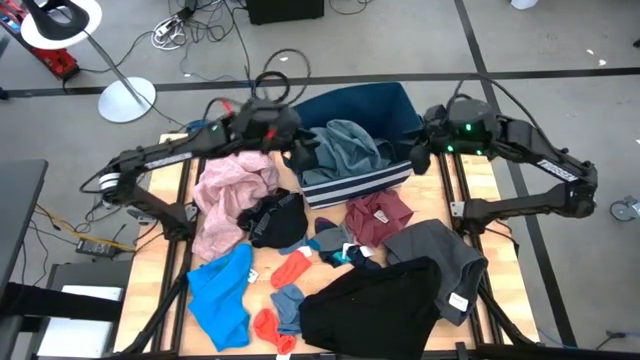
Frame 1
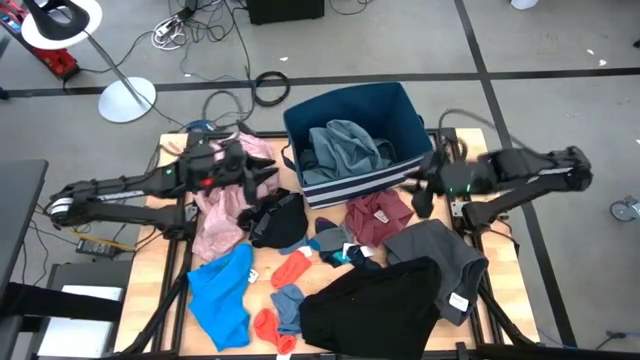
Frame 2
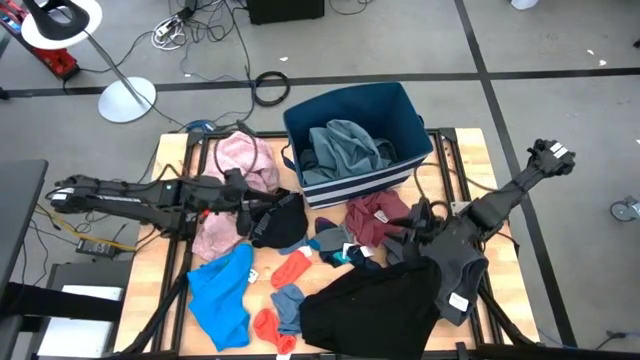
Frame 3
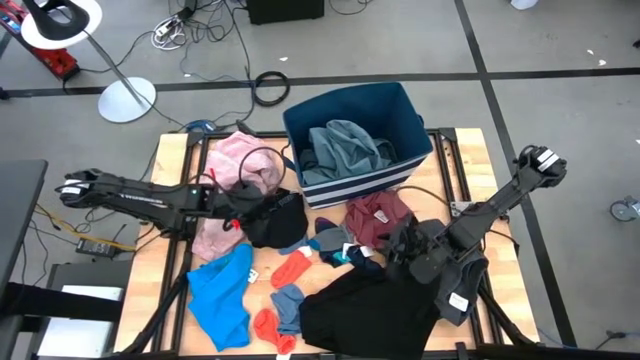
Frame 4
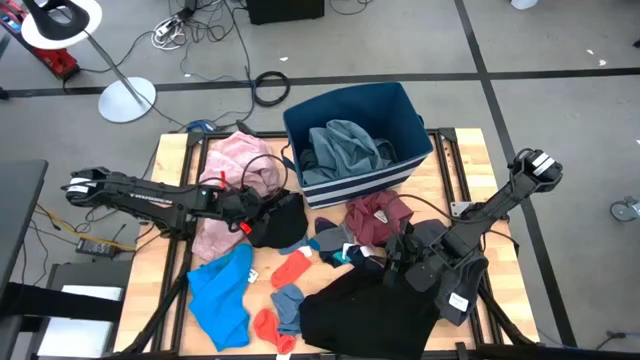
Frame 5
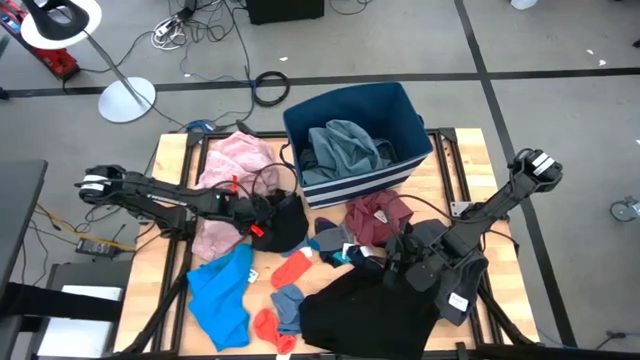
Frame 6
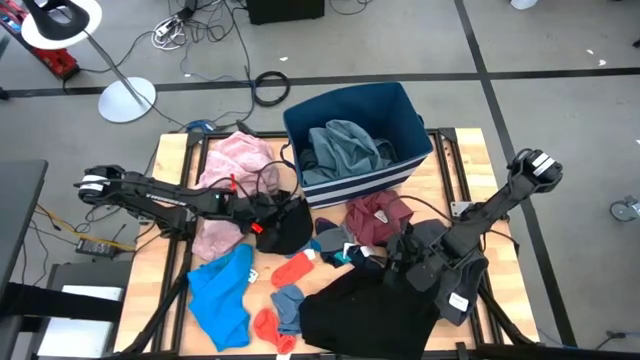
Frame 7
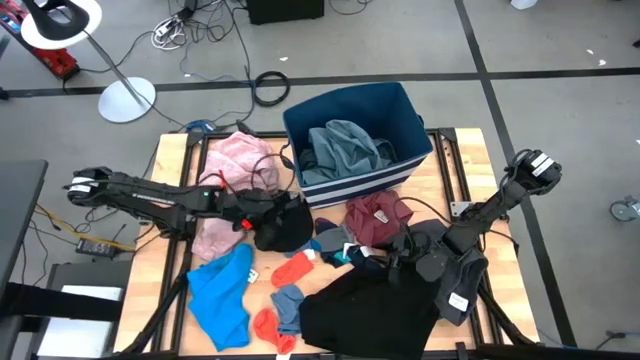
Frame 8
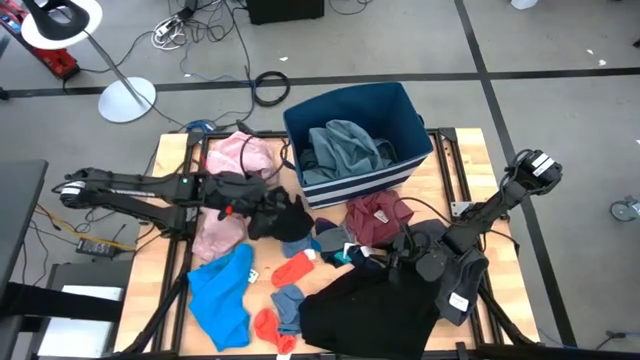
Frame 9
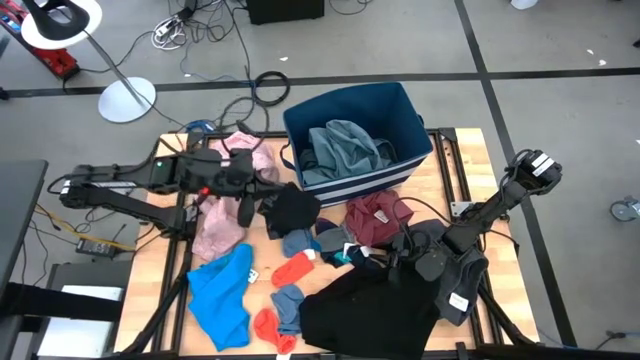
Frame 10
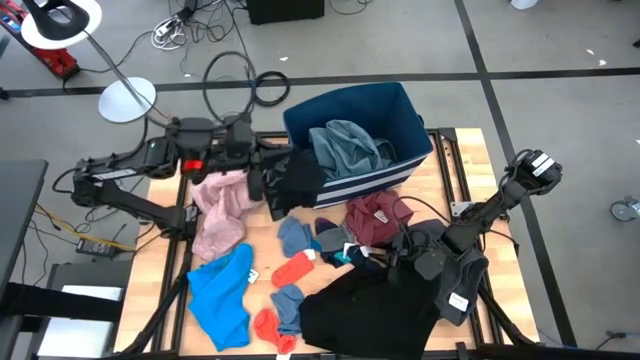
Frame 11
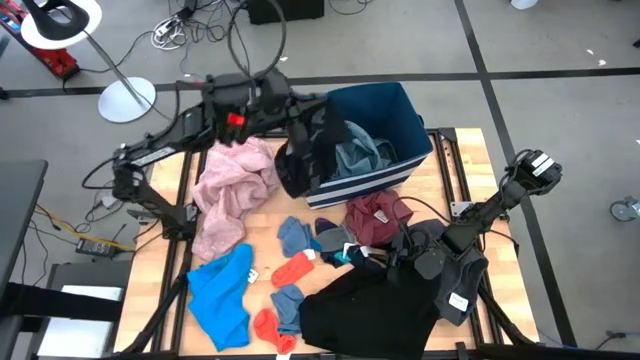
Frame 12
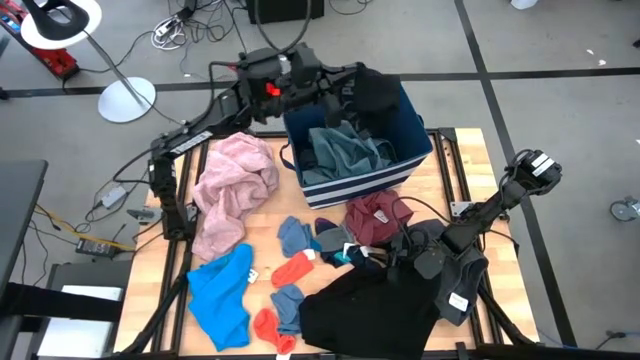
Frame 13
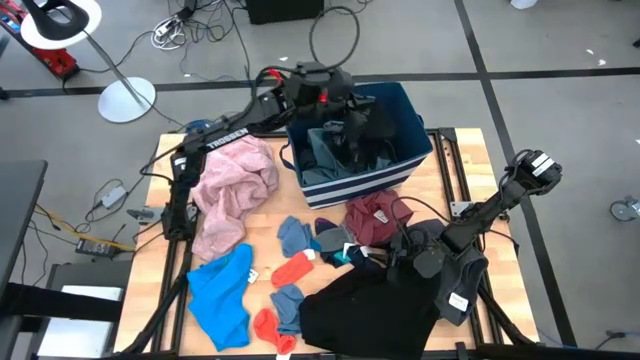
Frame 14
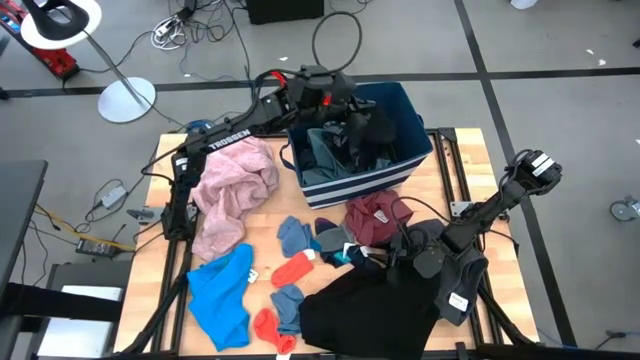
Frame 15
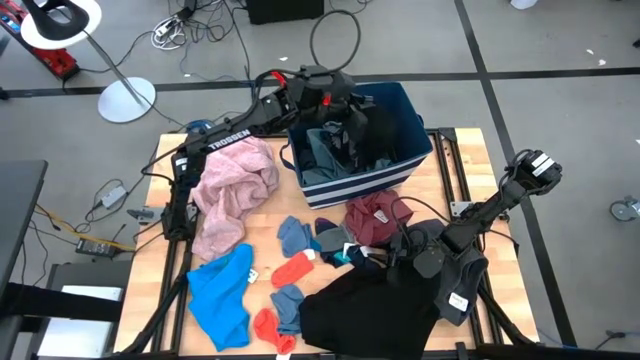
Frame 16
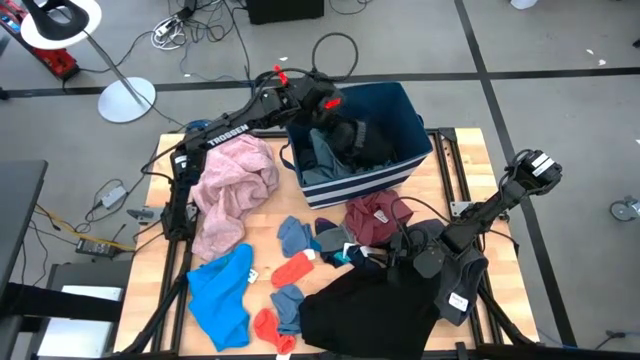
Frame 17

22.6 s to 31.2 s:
Task: Sort clothes
Put the black underwear in the blue laundry bin organizer

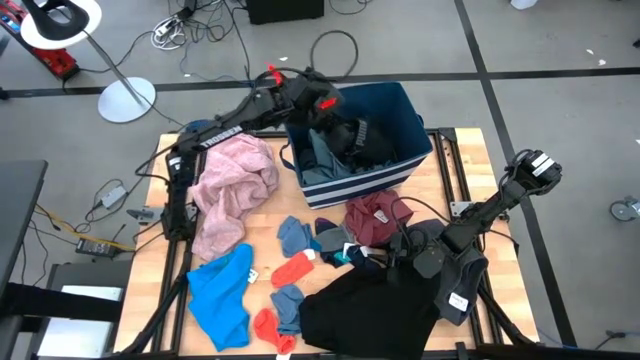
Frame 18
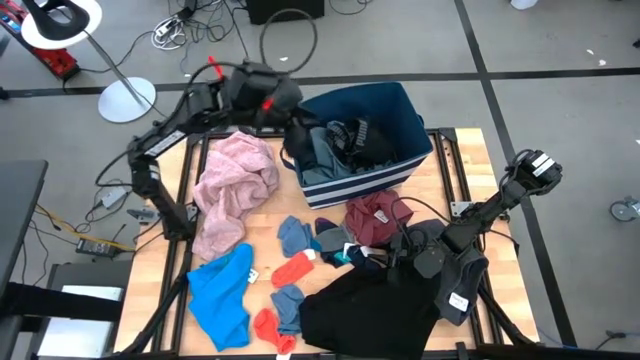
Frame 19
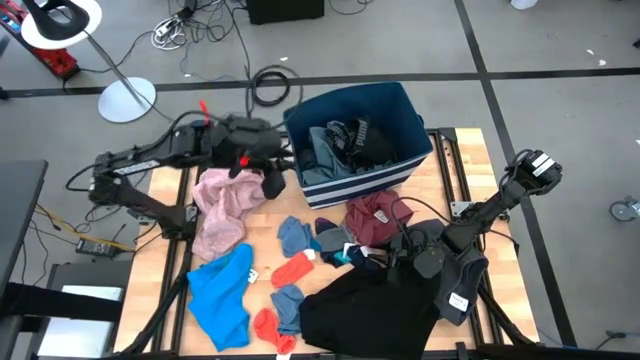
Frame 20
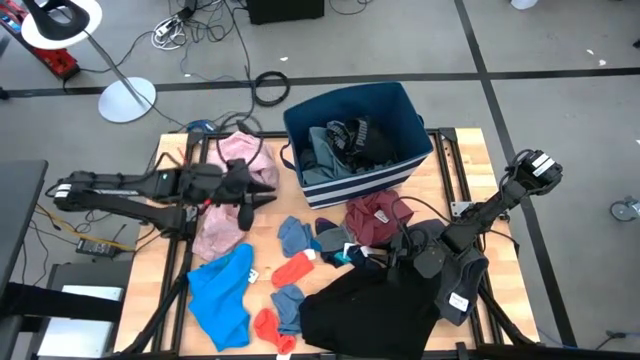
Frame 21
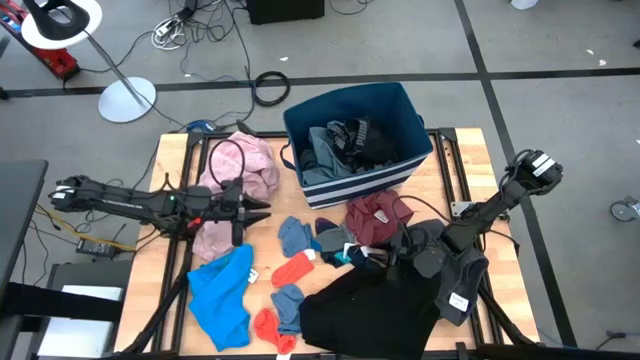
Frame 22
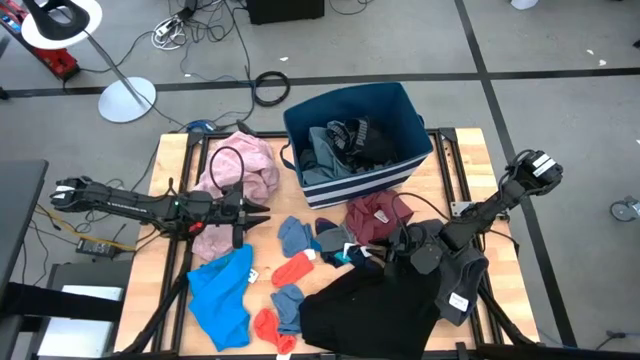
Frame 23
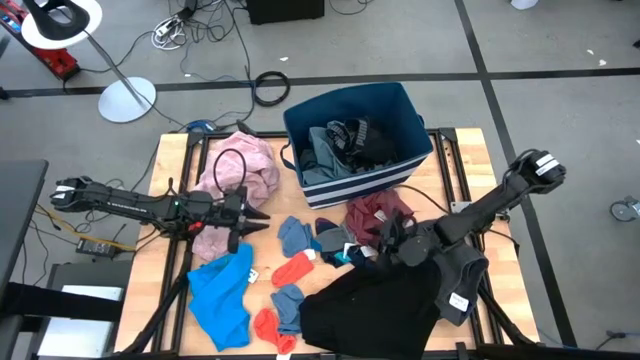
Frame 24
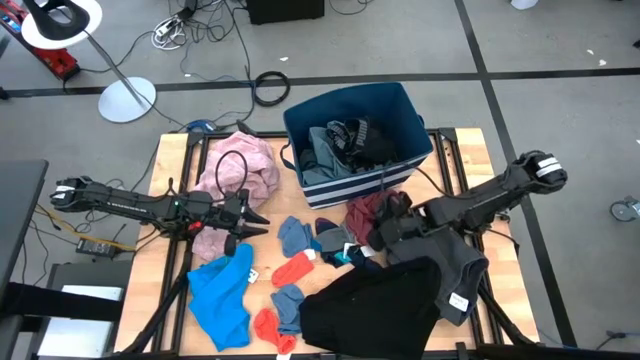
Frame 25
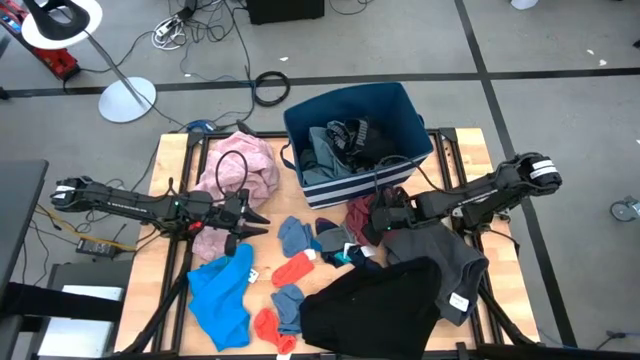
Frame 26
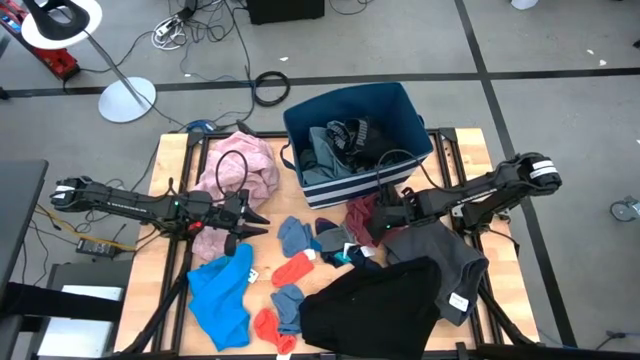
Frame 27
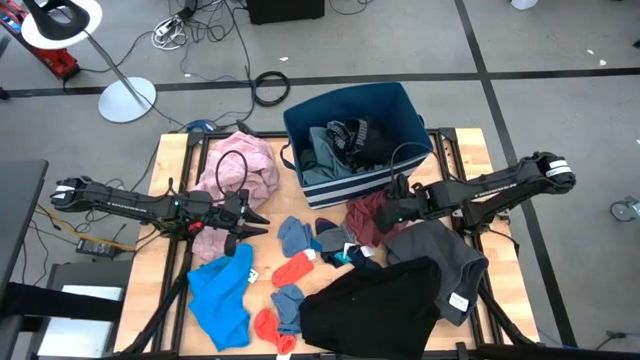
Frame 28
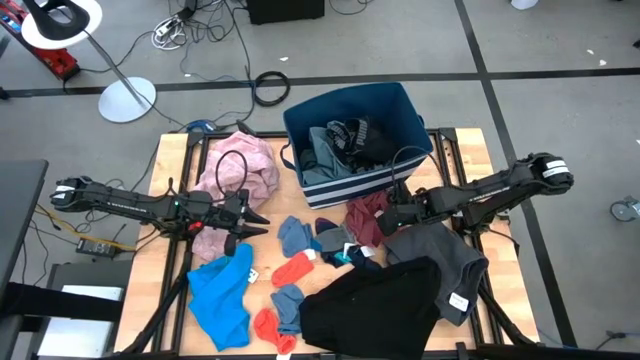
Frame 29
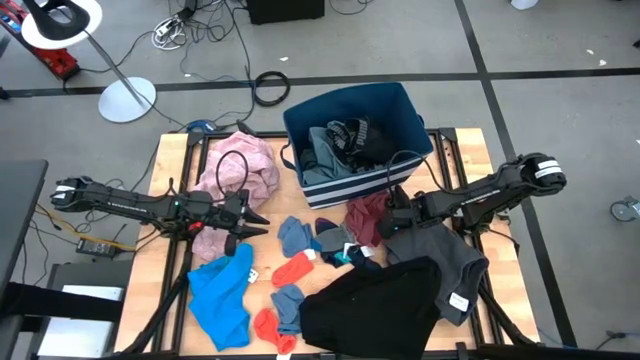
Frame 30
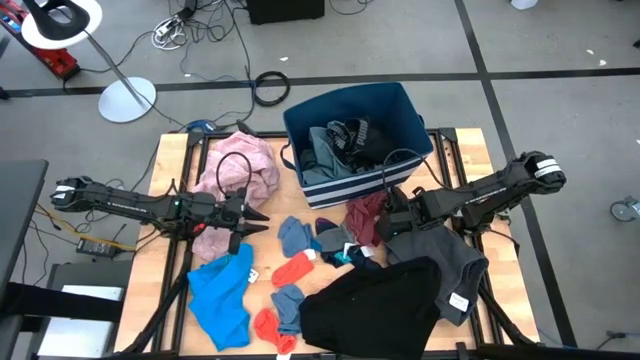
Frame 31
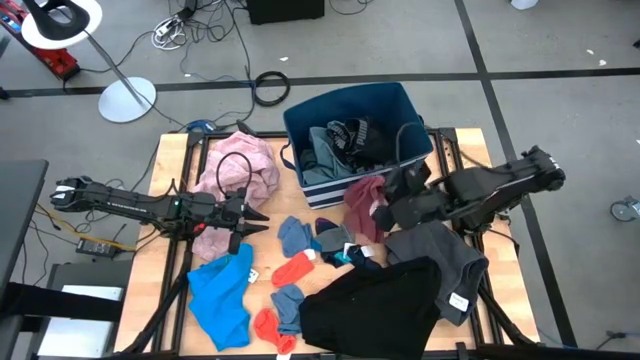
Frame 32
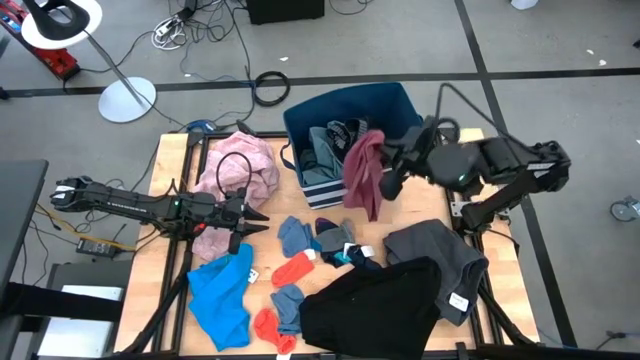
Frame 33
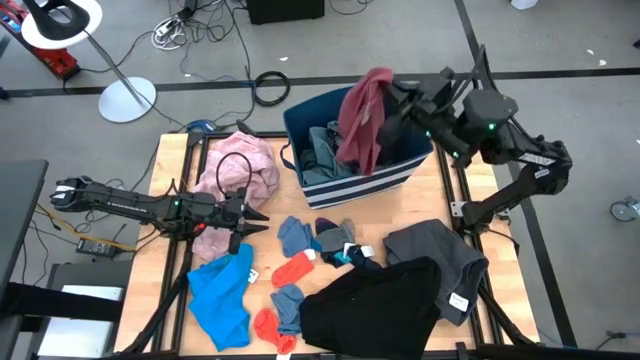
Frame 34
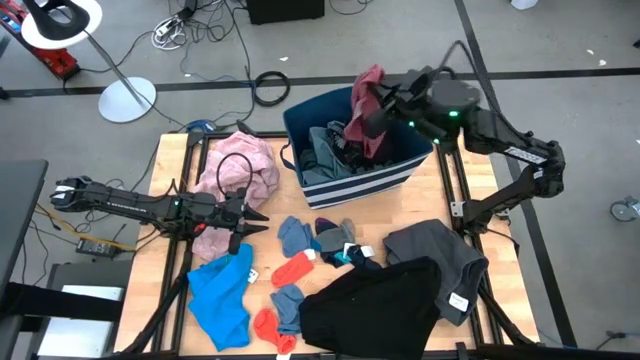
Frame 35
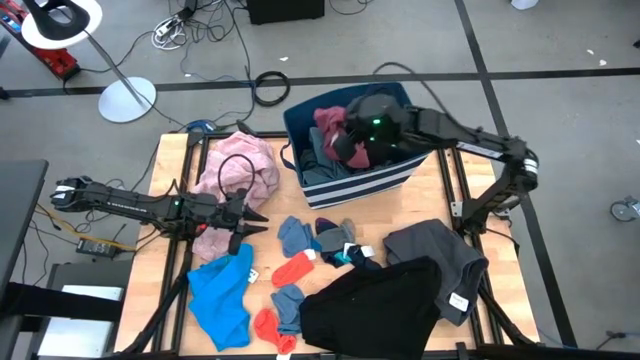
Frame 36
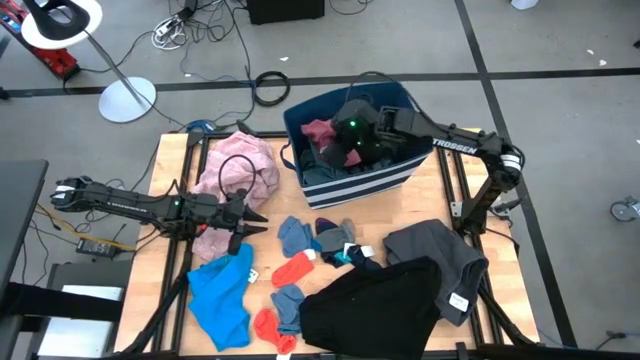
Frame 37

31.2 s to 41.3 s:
Put the maroon underwear in the blue laundry bin organizer

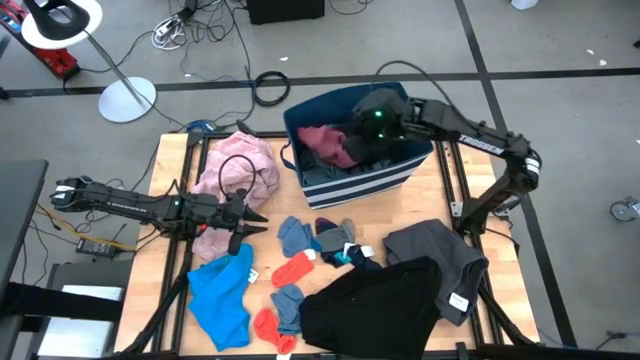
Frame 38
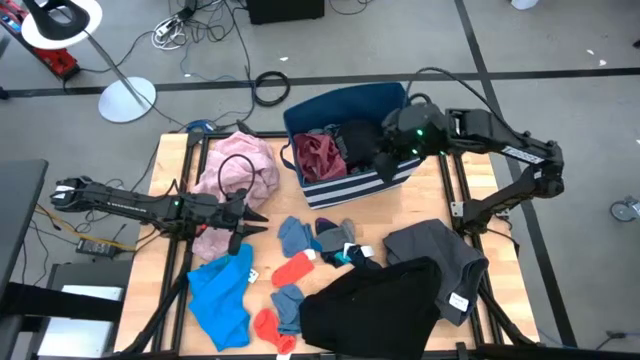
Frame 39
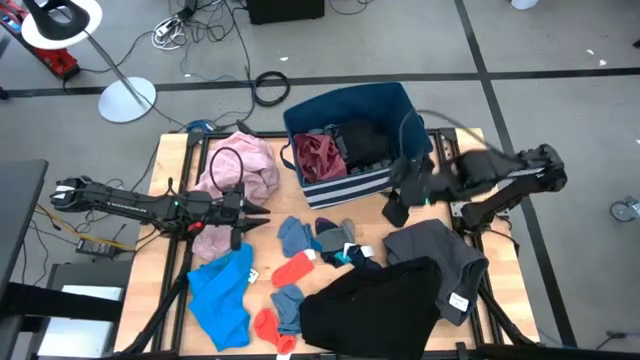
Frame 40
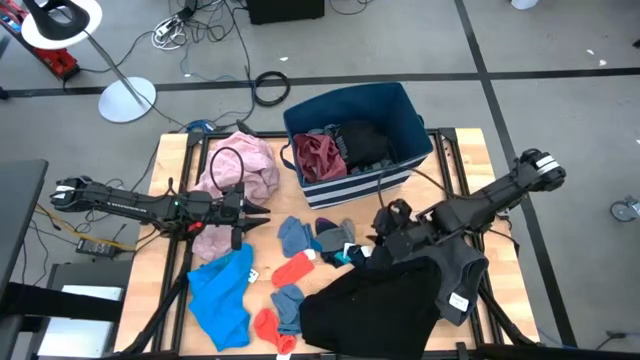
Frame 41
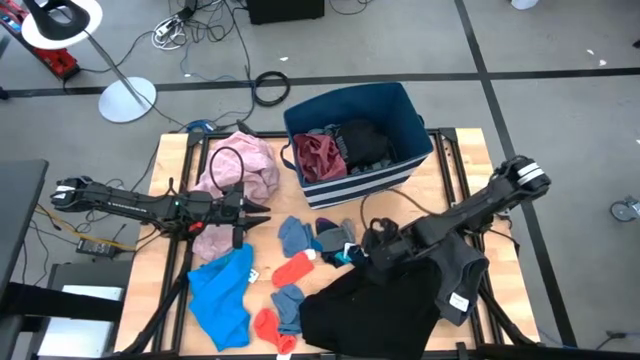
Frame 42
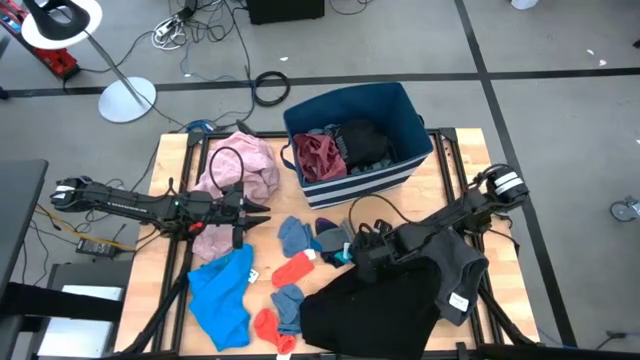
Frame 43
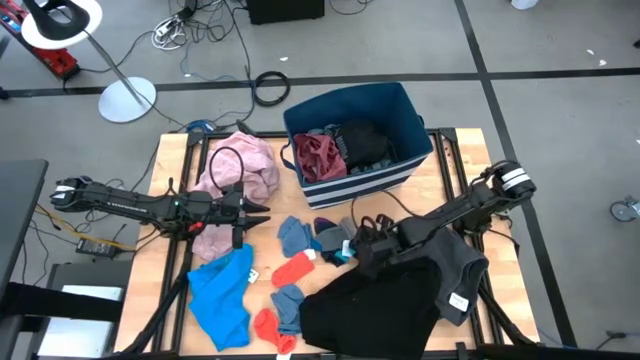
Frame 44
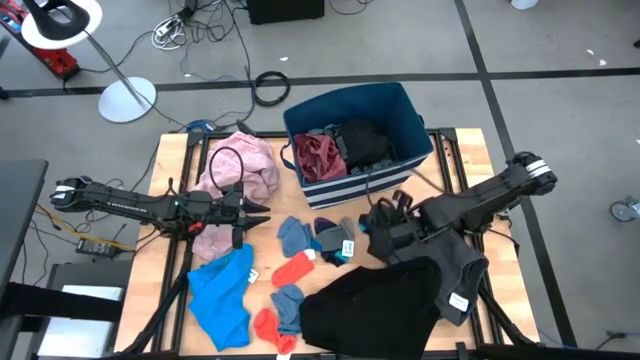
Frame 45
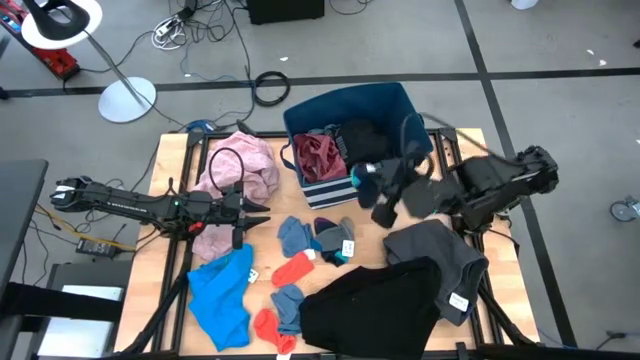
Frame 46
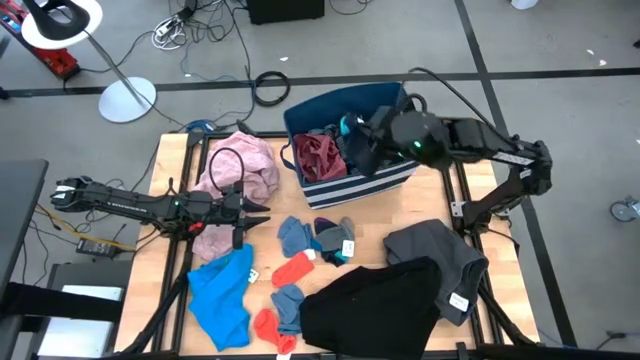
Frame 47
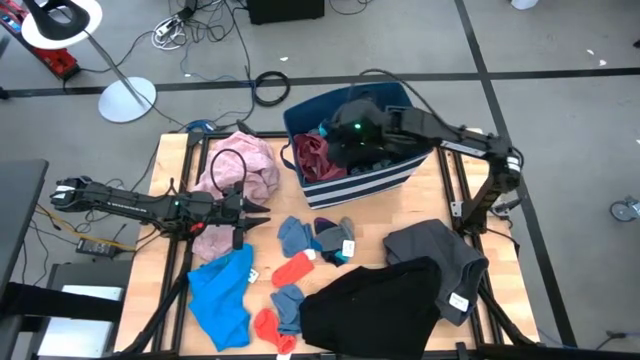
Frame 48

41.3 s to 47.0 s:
Put the right blue sock in the blue laundry bin organizer
